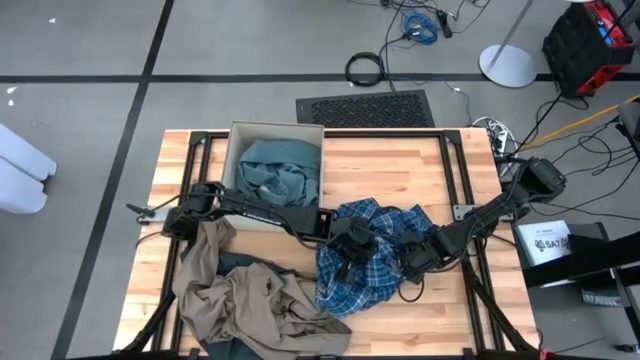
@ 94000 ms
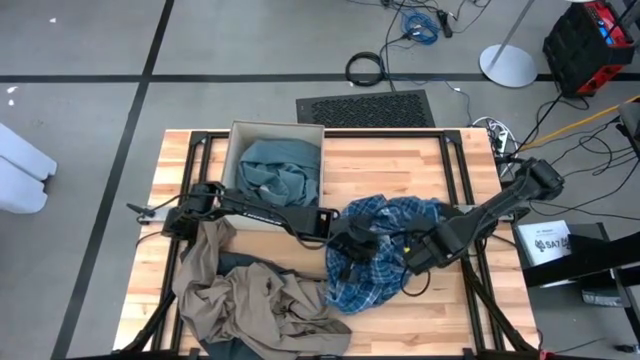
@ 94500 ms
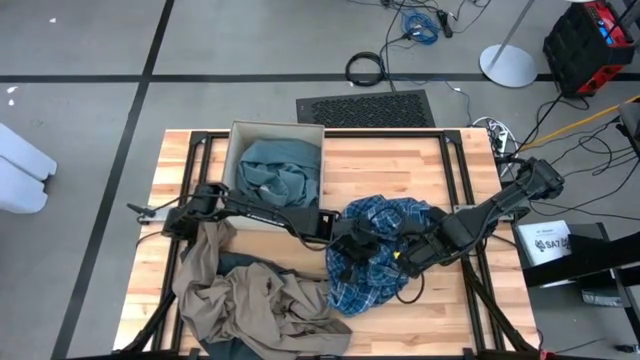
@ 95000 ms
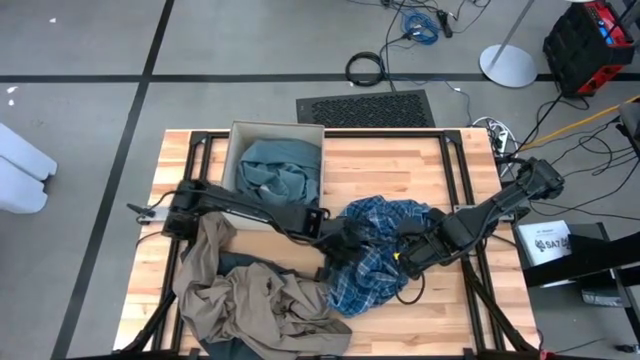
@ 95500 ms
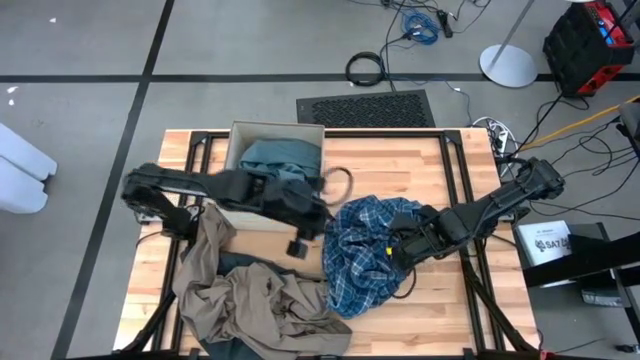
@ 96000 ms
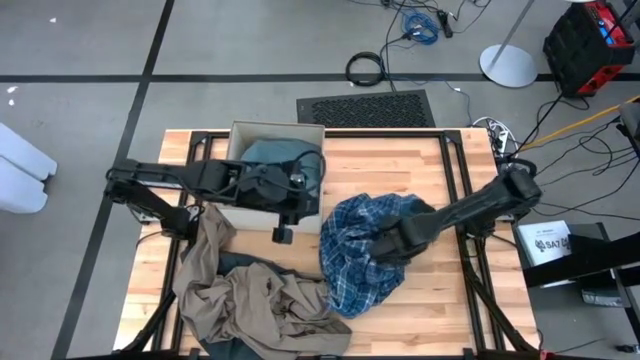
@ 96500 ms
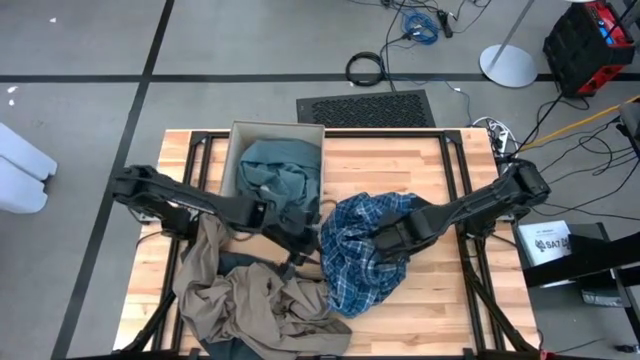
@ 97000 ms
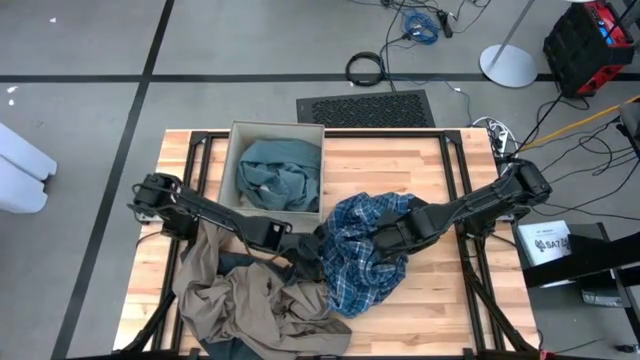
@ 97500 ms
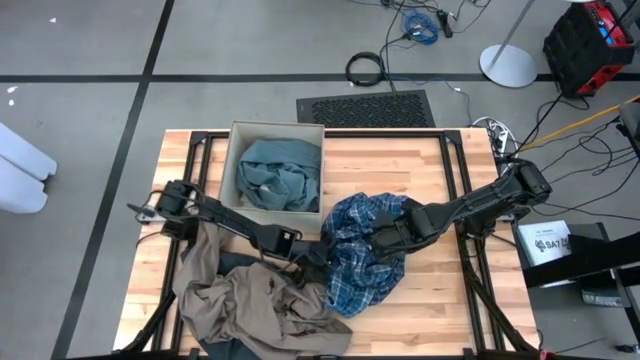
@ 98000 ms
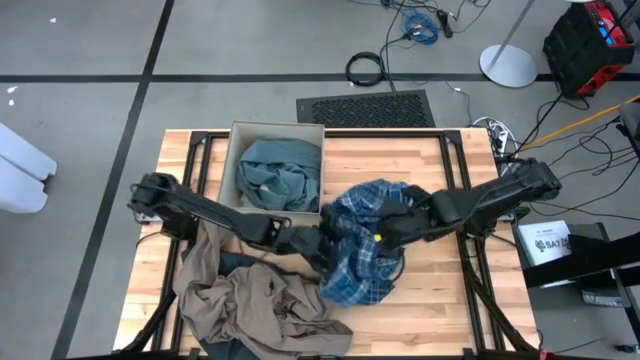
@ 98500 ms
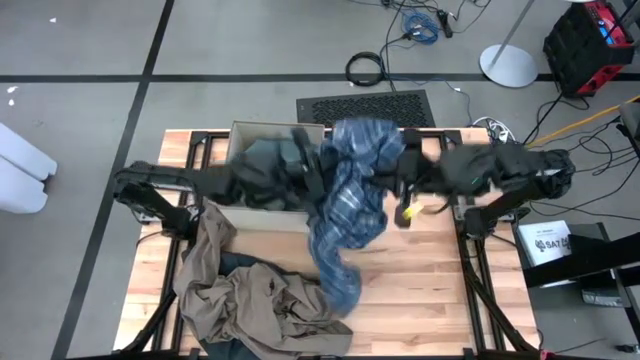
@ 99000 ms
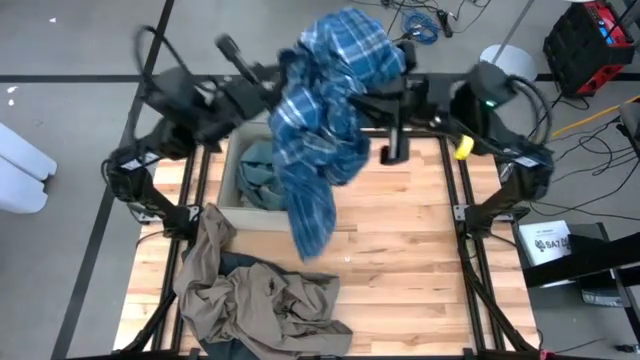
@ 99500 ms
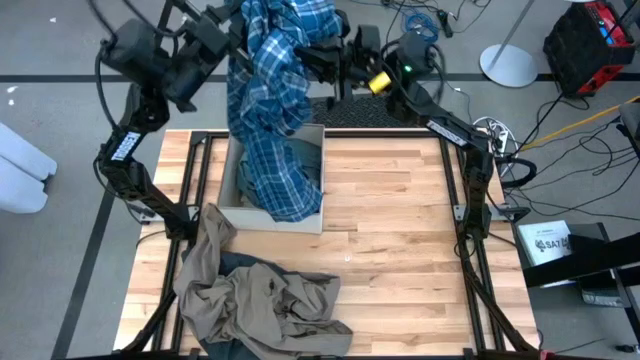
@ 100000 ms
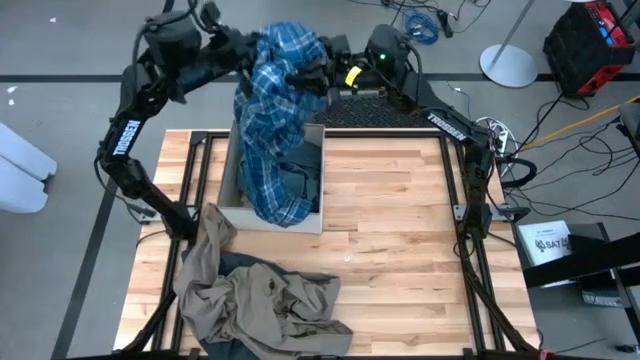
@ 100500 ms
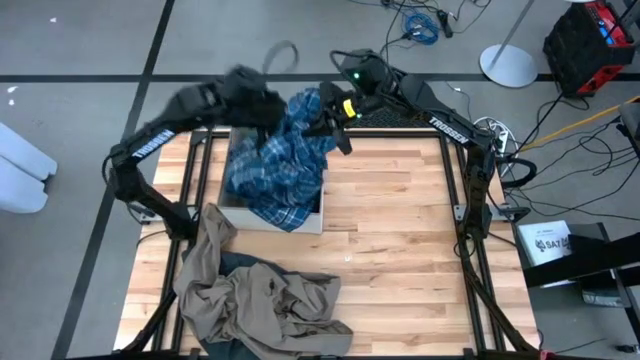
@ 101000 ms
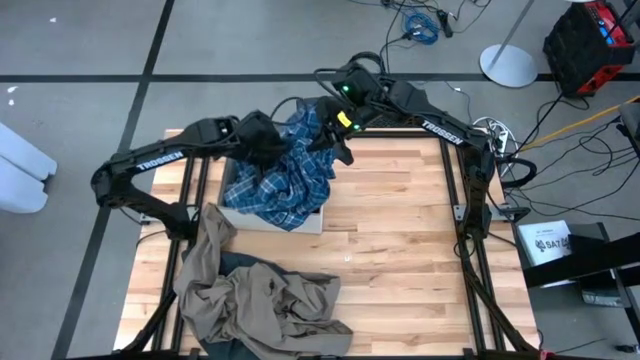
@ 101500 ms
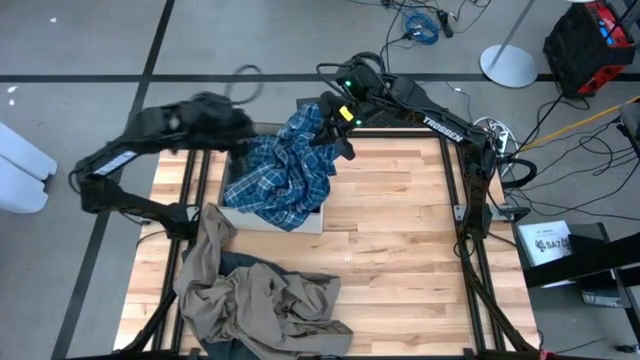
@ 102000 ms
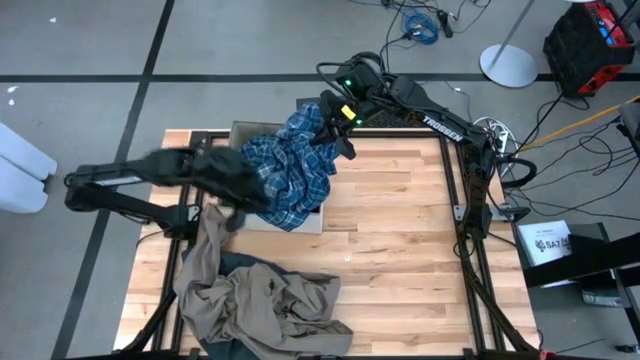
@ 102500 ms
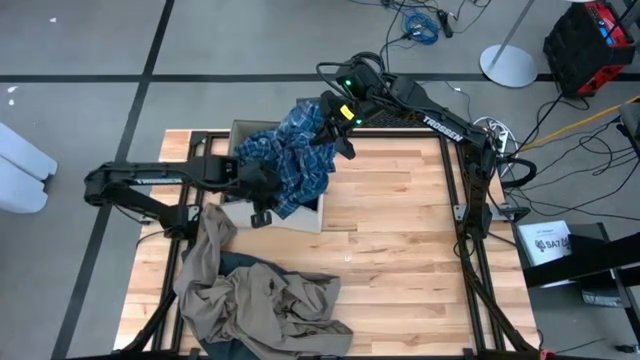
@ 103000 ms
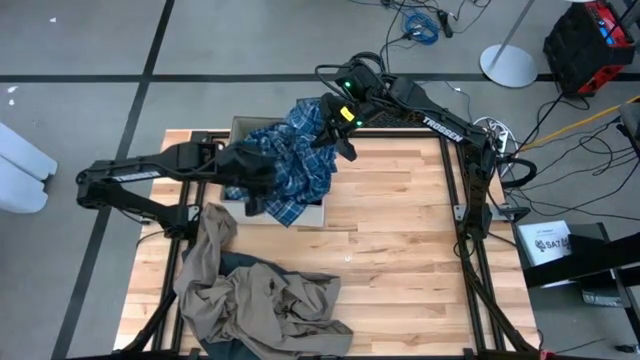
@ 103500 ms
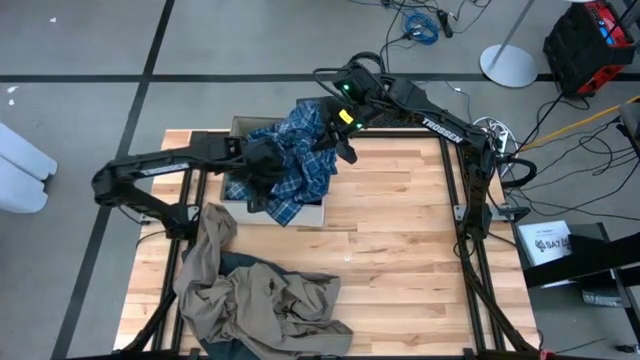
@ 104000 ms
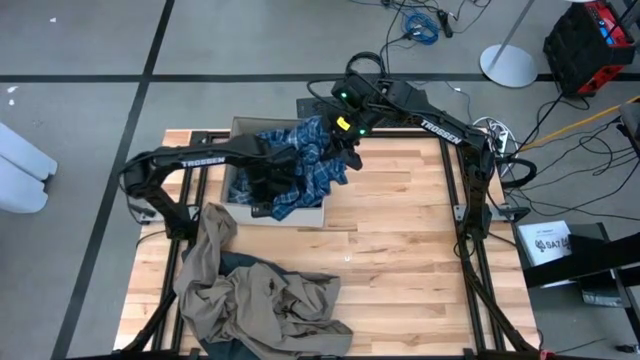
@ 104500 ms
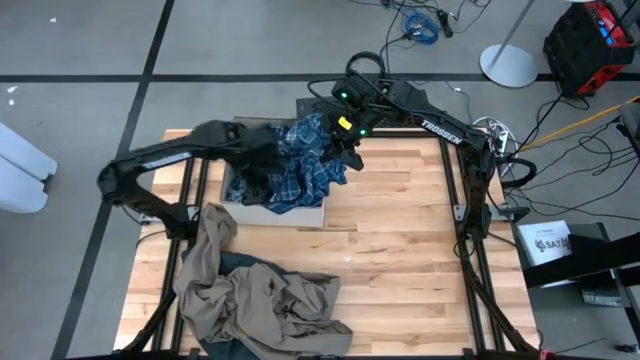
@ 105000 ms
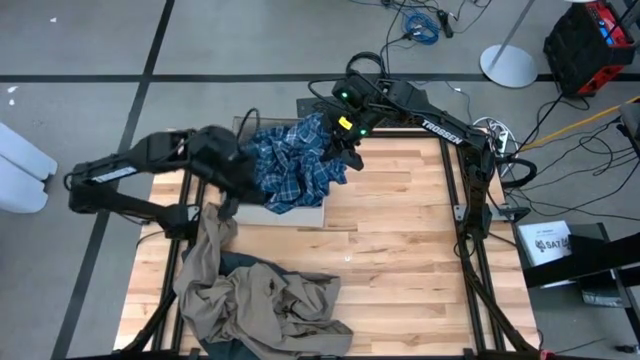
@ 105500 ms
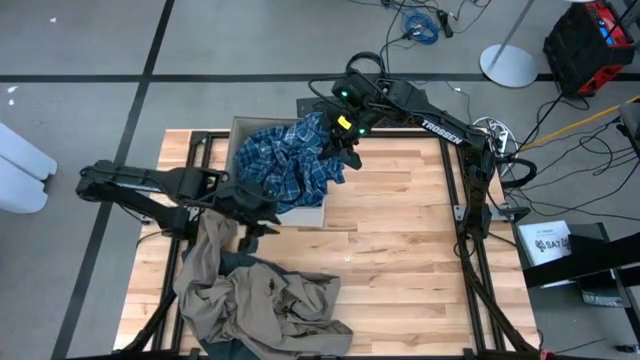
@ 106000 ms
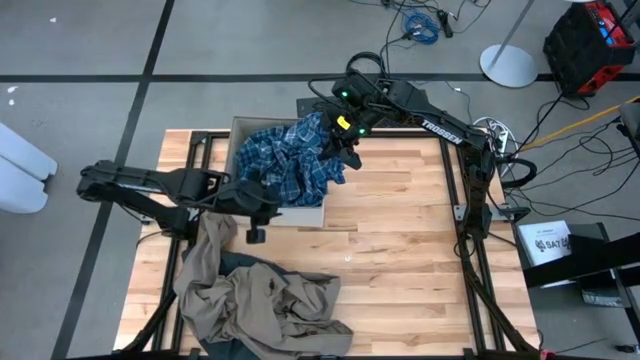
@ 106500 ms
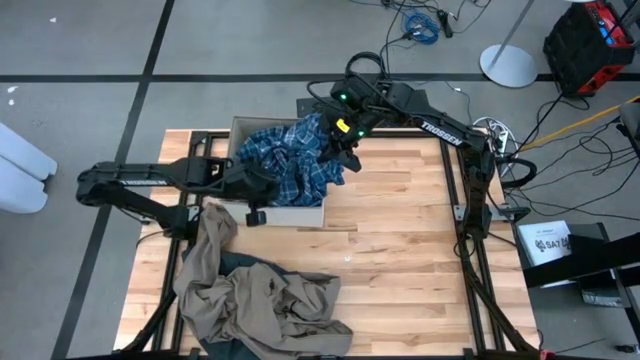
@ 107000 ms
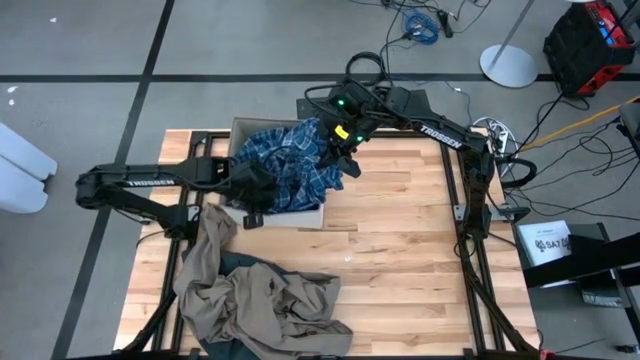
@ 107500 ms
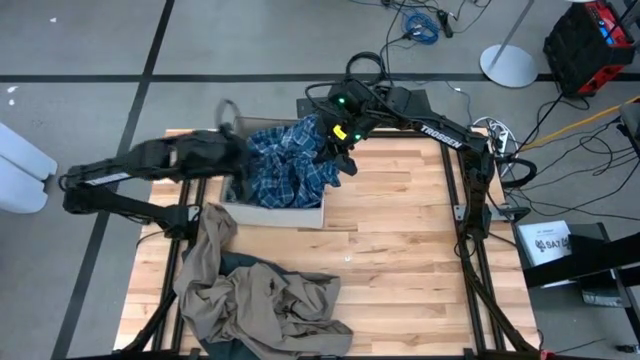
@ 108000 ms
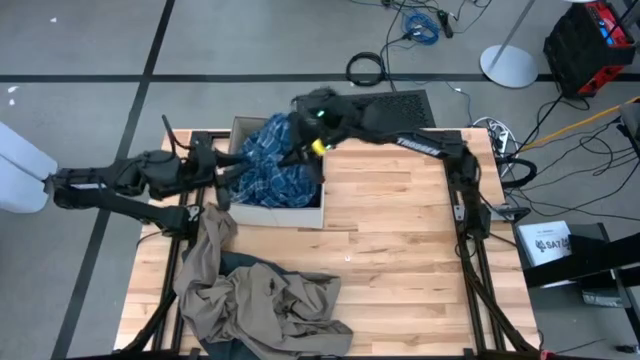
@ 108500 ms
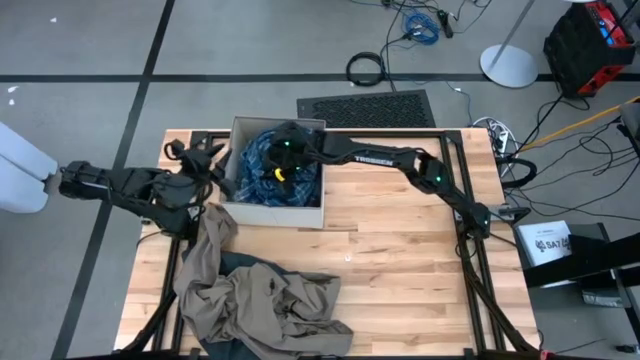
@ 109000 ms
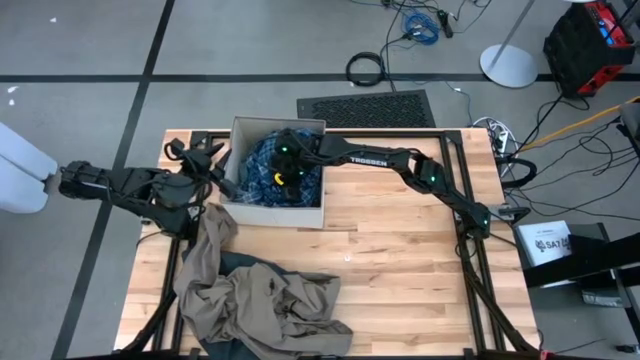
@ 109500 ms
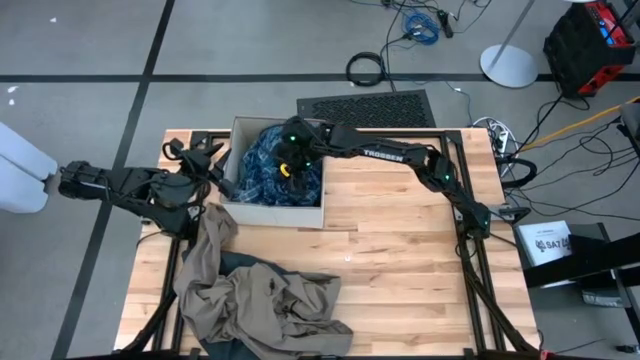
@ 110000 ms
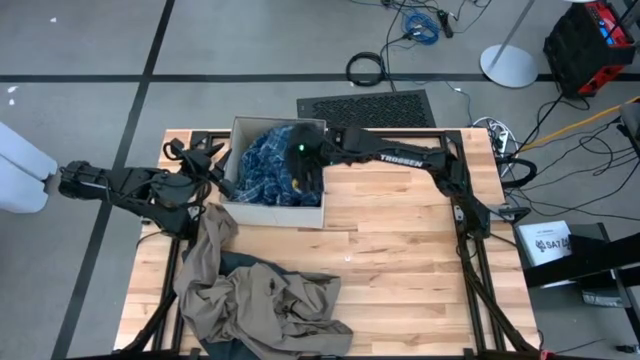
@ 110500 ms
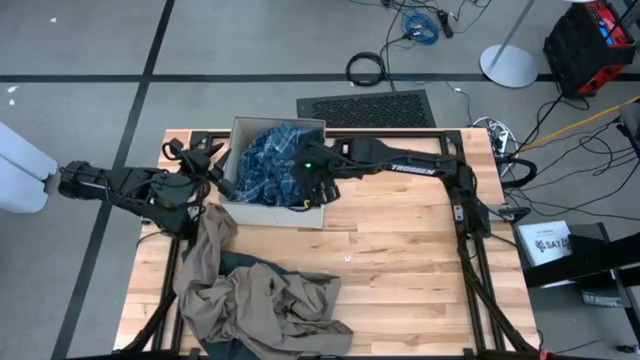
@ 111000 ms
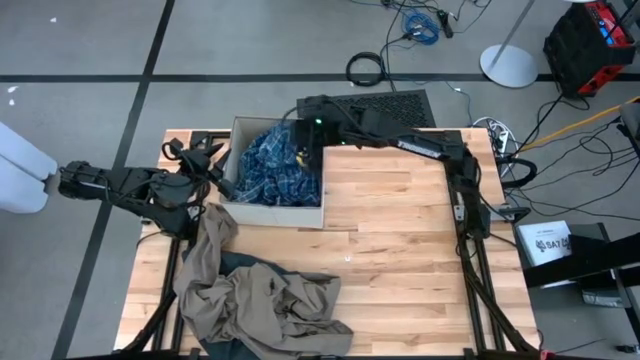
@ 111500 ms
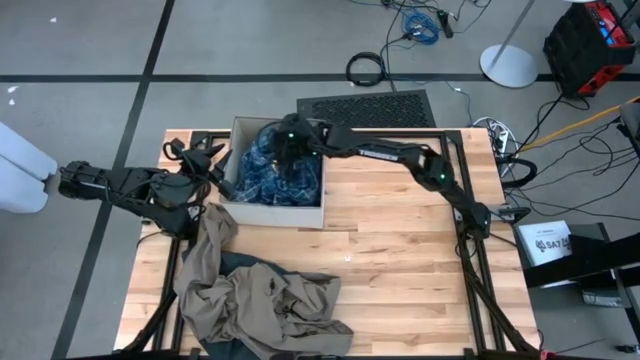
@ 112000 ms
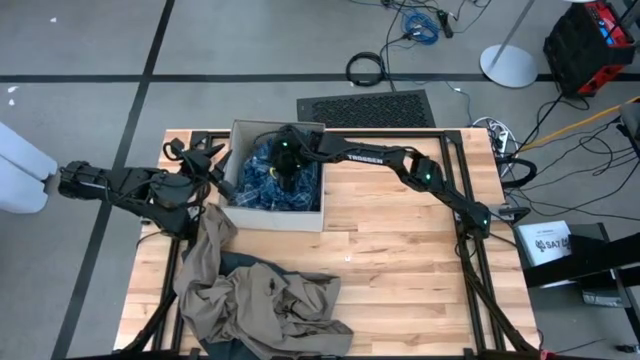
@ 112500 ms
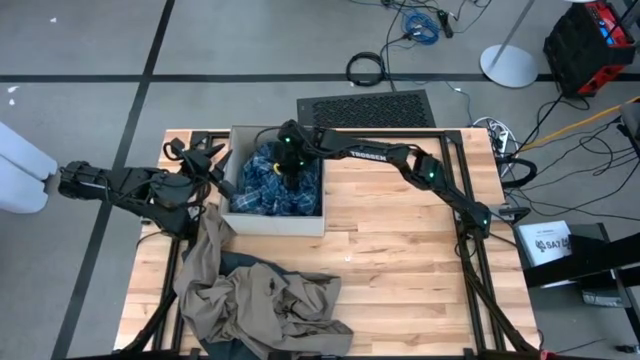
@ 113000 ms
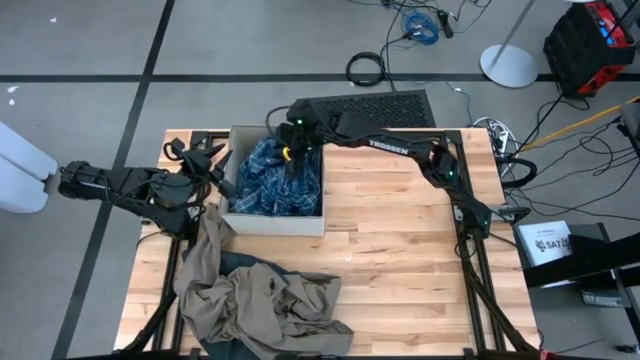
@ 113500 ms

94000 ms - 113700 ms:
Task: Sort clothes
Put the blue long sleeve into the white laundry bin
